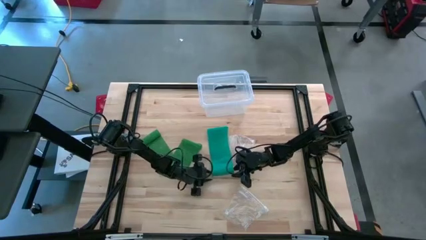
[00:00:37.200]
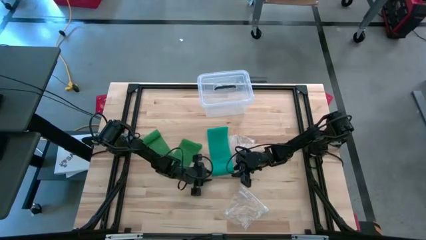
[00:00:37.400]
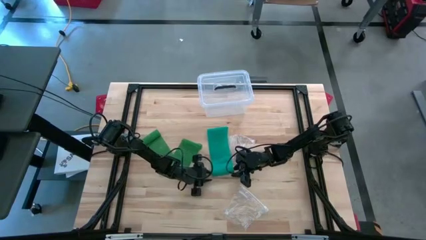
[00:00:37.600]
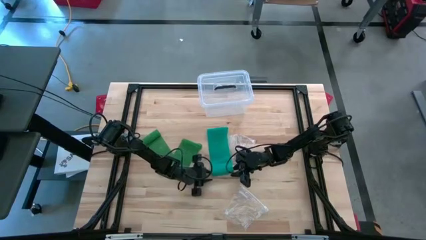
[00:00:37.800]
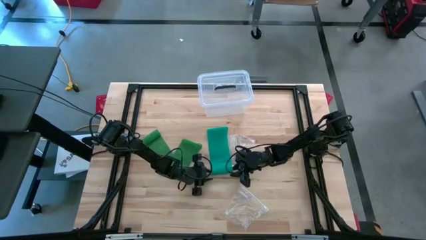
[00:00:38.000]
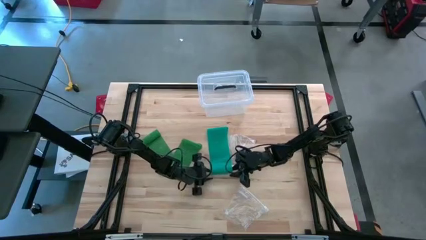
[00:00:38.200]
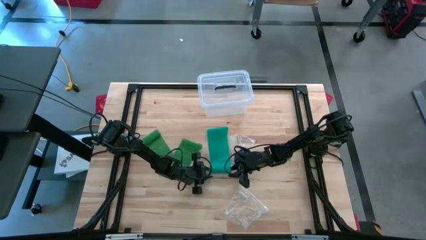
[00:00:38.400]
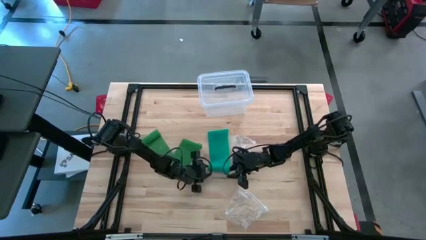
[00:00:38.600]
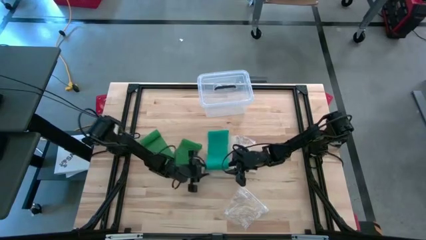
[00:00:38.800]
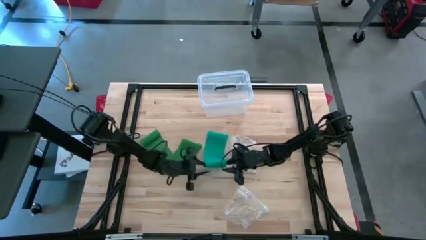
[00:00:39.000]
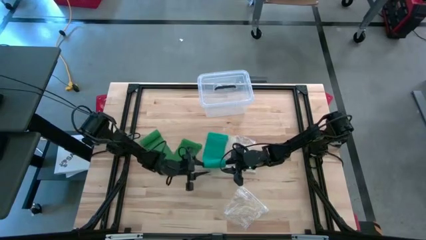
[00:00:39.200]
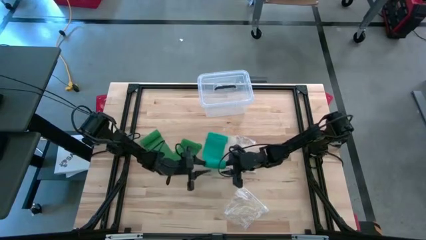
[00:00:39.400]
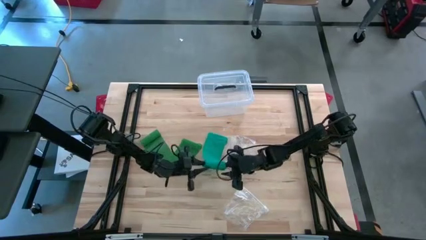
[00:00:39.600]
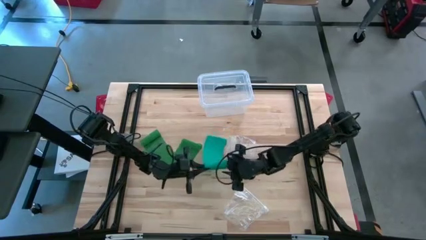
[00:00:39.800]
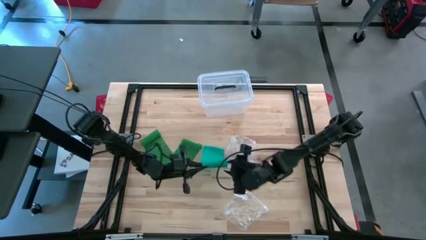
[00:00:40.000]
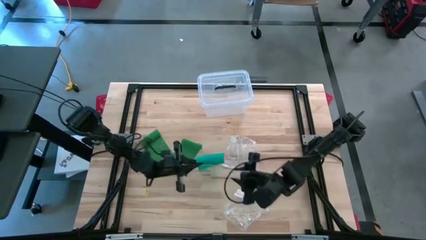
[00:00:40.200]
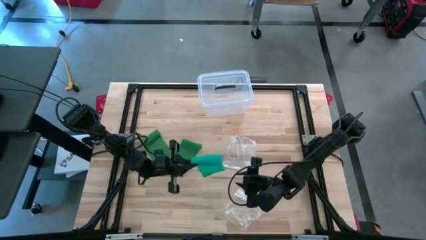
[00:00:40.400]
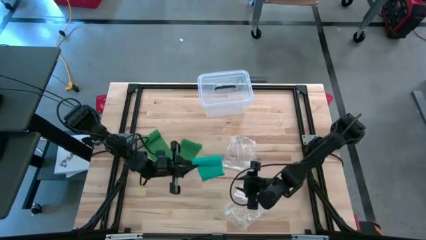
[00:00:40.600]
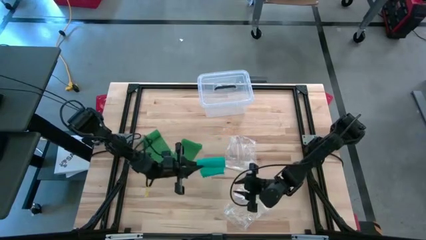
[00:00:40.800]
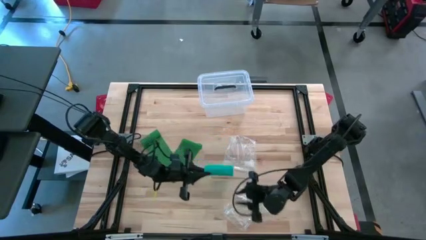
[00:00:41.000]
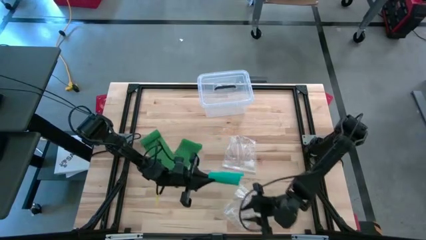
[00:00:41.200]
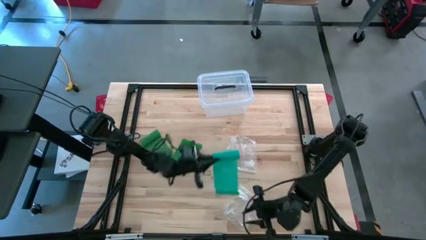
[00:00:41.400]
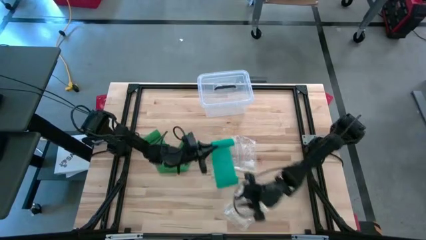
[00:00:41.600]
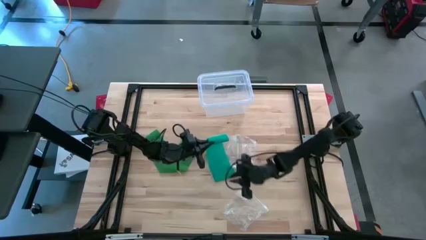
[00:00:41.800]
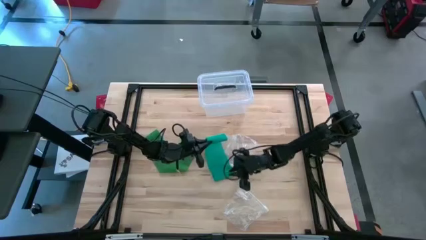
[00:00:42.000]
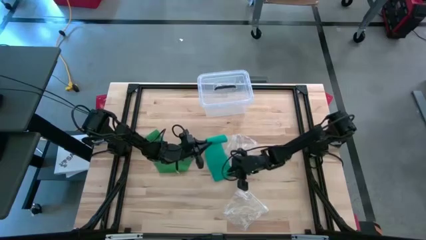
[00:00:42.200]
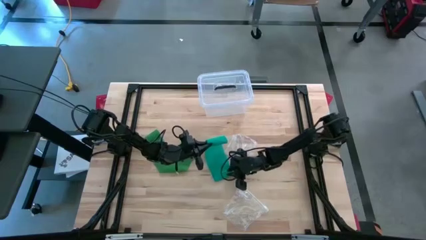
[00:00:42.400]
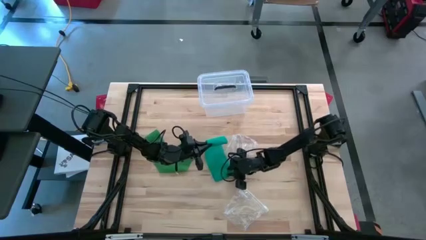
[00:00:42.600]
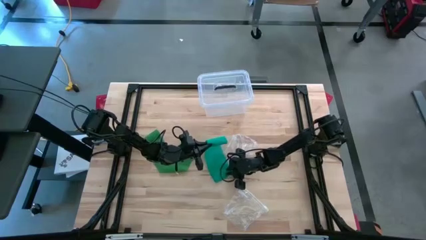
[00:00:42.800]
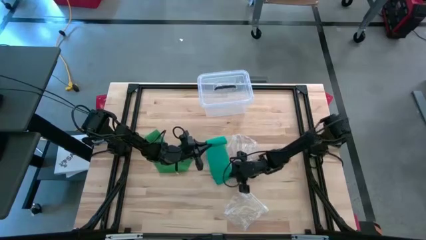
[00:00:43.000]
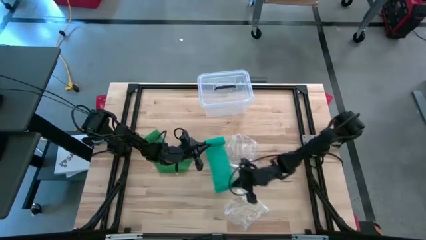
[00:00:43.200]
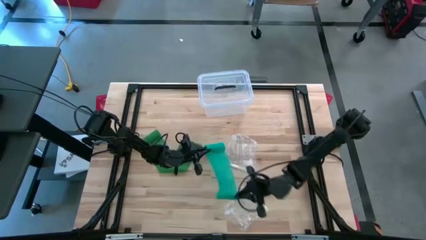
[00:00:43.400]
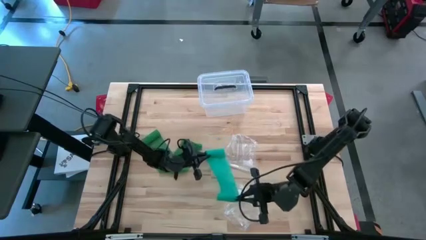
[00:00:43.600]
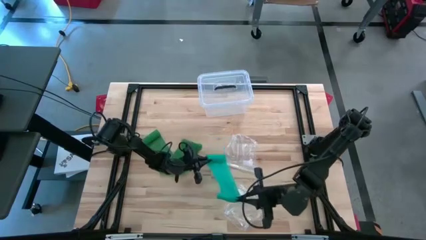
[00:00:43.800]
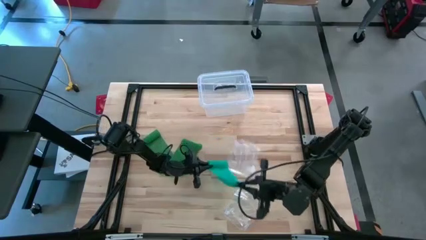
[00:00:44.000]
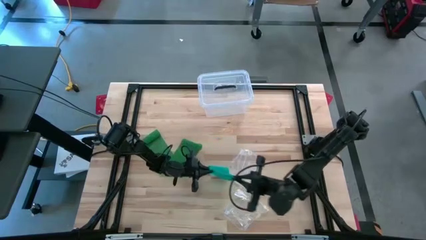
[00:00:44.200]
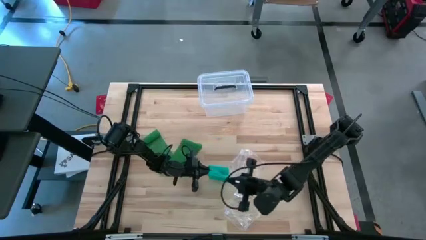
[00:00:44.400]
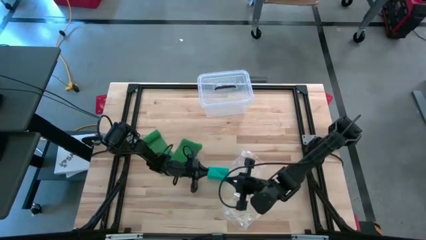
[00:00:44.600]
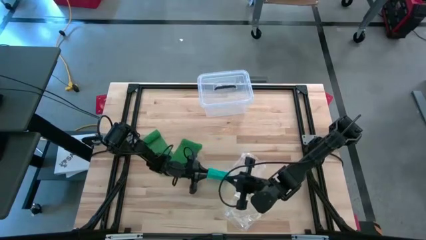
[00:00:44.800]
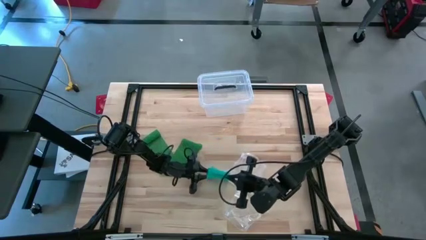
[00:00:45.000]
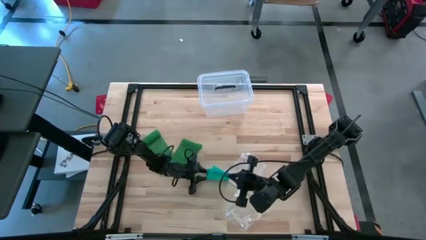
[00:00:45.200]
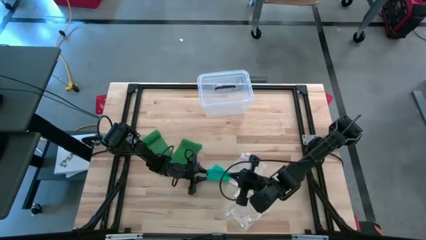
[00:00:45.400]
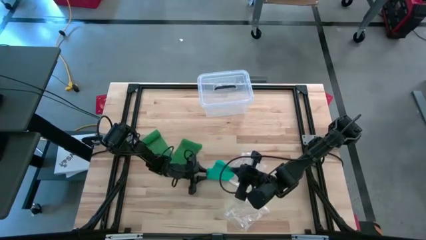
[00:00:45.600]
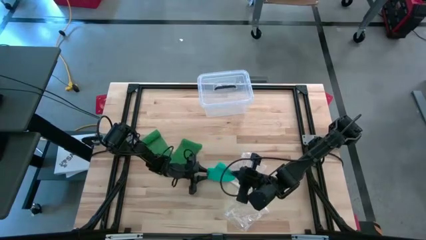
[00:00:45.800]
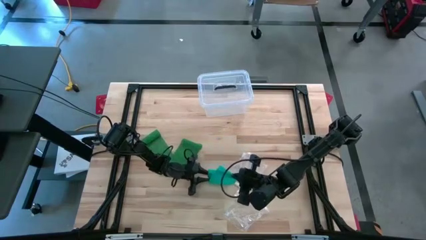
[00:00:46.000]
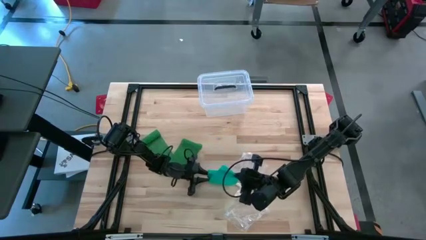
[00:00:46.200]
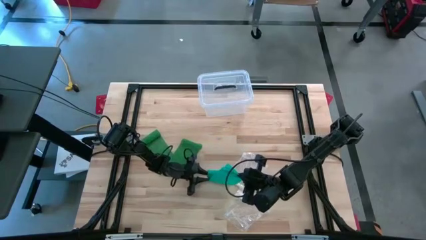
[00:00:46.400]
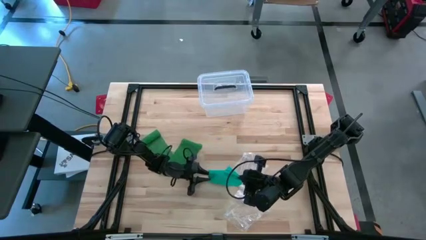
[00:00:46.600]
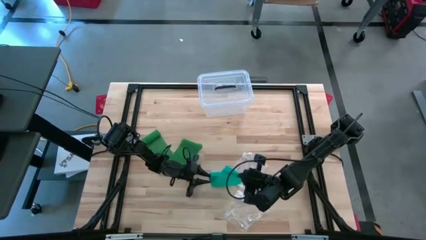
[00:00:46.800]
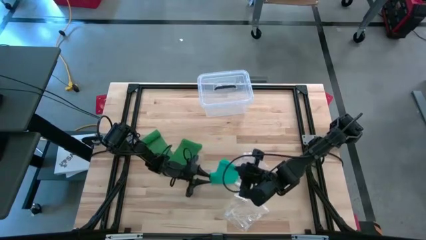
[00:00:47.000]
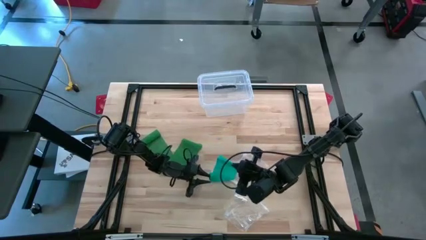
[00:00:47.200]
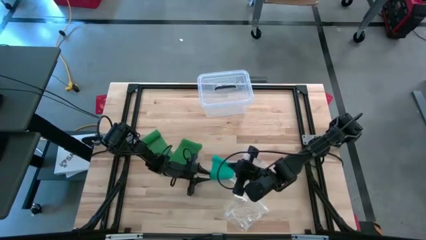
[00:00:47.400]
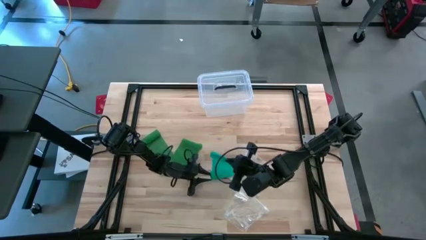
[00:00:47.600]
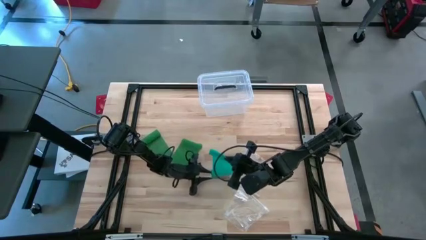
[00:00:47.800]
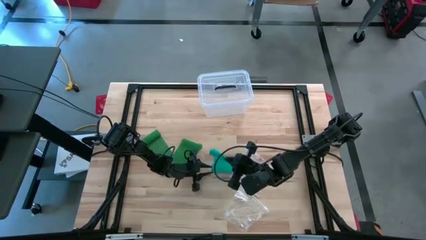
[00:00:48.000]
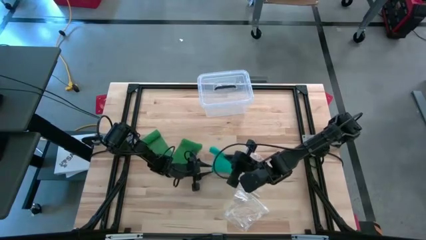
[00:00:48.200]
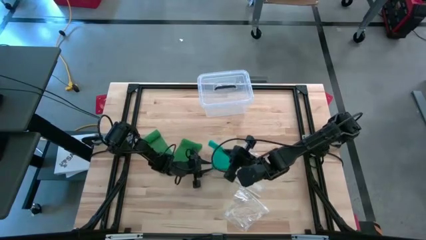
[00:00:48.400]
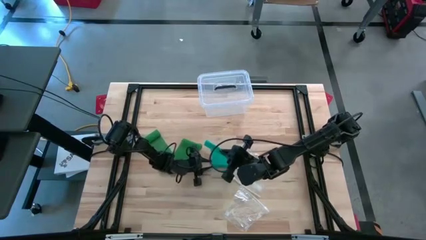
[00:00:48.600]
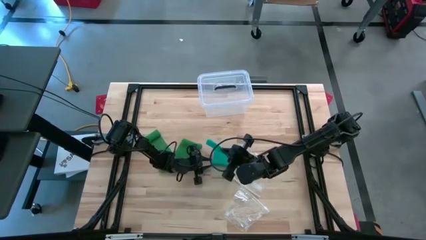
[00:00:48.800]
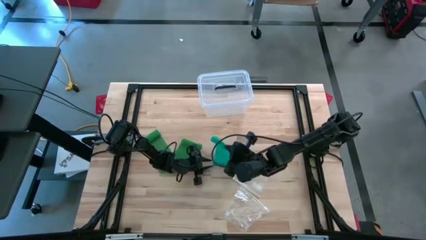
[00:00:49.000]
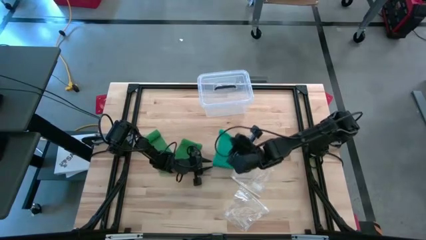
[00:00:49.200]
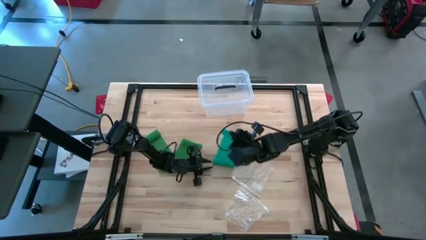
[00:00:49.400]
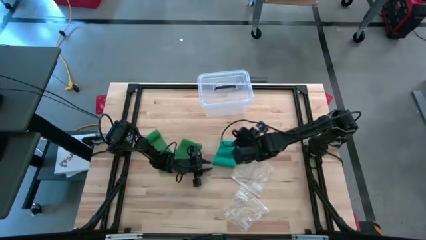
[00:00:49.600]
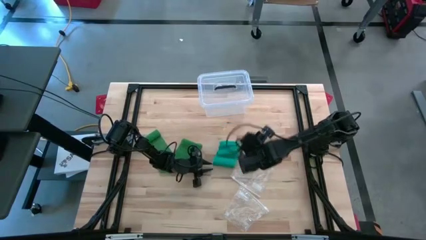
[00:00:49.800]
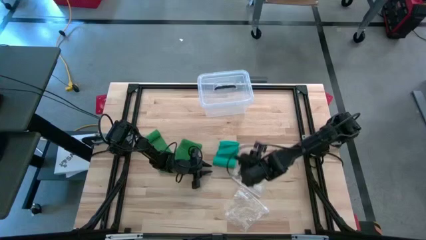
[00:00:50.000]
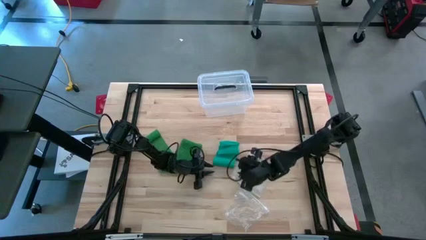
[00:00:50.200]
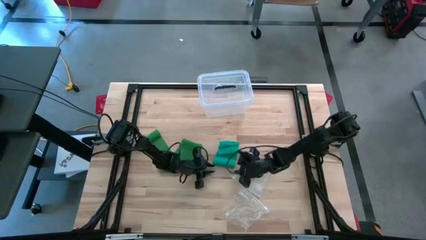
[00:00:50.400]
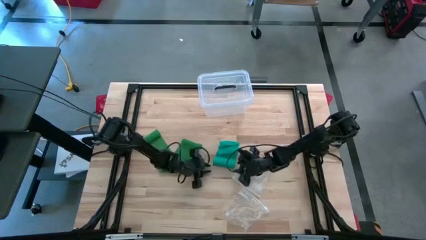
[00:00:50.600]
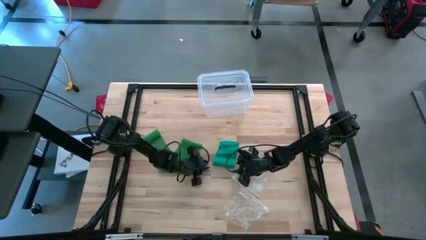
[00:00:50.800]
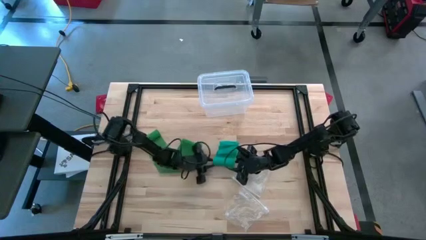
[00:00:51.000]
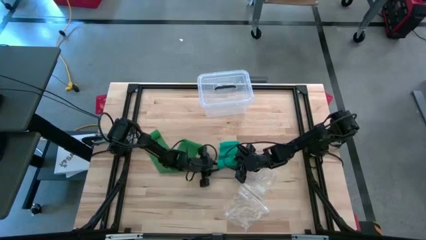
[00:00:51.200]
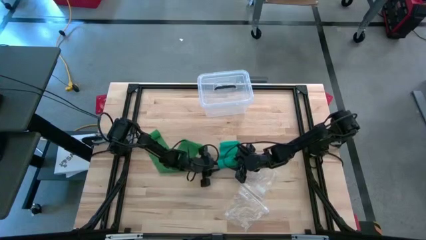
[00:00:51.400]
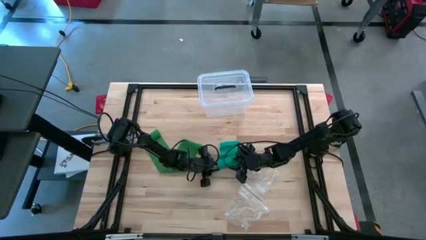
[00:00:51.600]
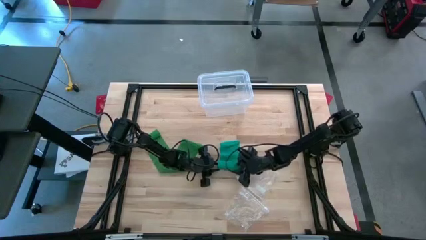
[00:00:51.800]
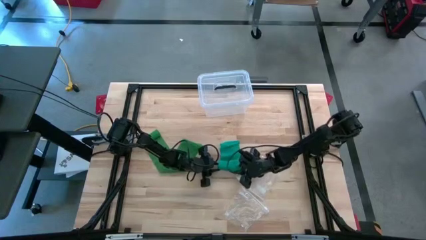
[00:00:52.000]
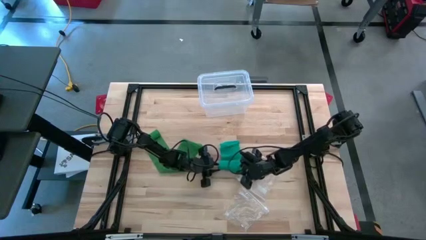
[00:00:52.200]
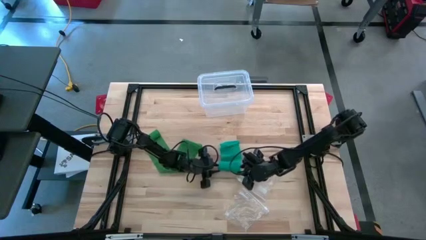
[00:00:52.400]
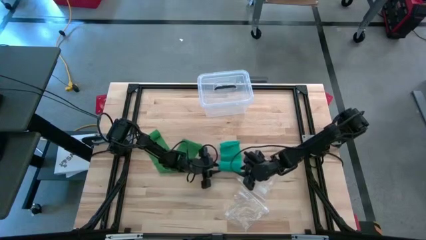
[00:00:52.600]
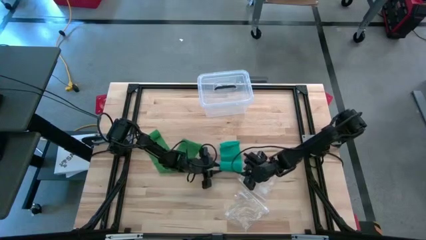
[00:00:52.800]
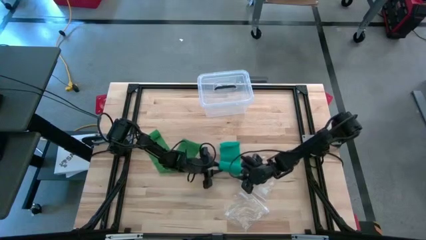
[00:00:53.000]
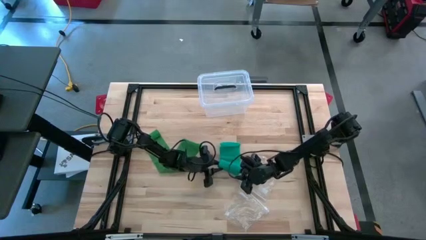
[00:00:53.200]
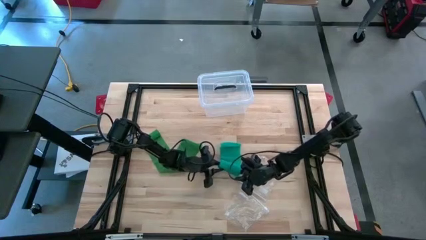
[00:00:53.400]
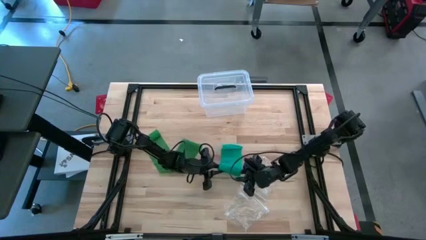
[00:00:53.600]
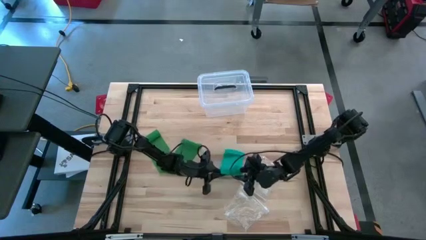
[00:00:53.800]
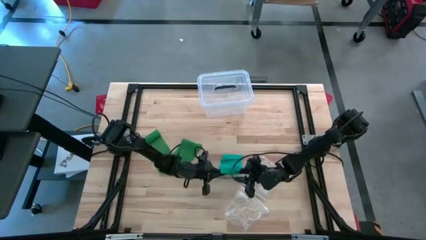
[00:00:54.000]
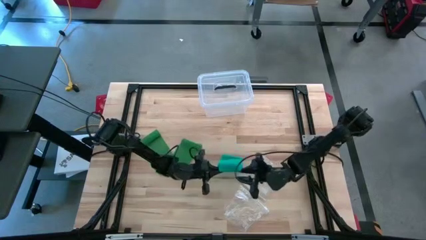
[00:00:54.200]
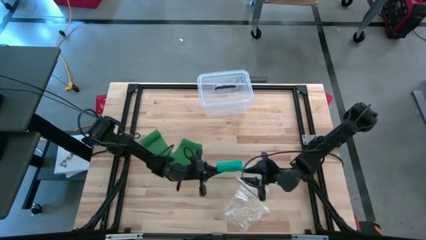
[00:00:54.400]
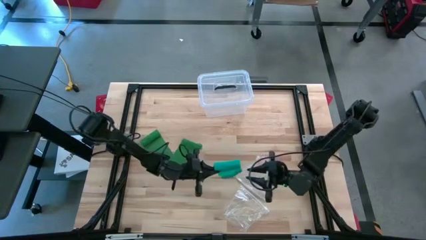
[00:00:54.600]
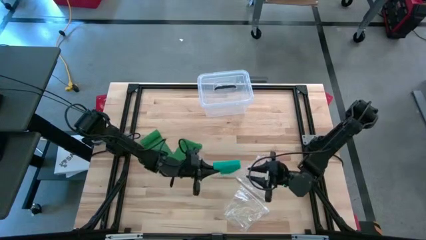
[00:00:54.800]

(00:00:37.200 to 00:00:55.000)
Task: Roll bandage
Roll the blue bandage
